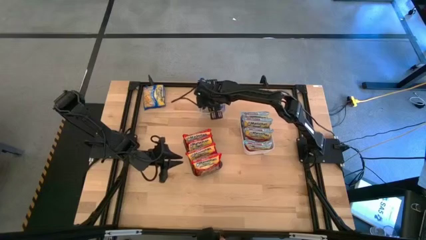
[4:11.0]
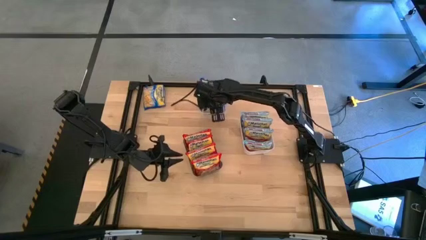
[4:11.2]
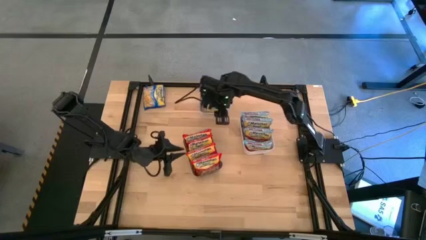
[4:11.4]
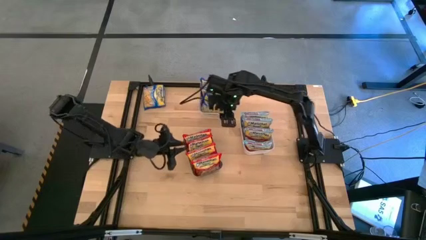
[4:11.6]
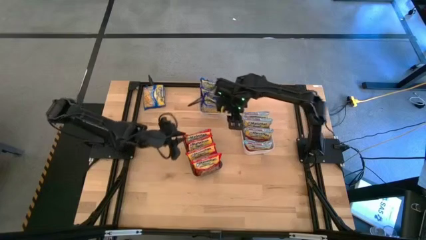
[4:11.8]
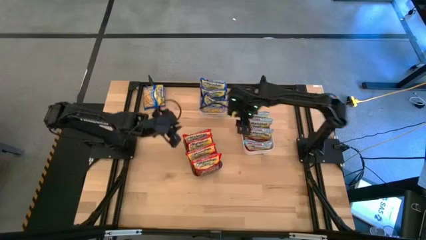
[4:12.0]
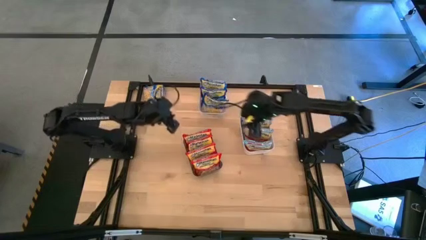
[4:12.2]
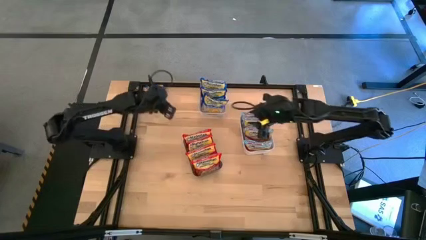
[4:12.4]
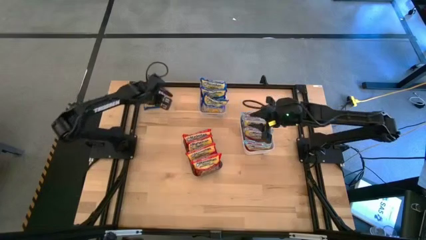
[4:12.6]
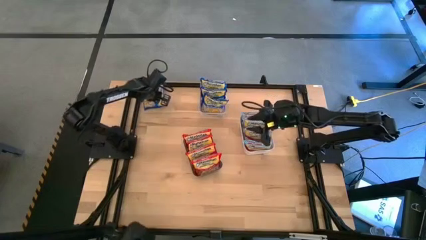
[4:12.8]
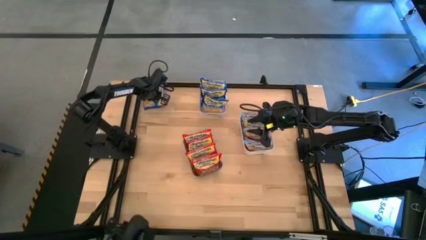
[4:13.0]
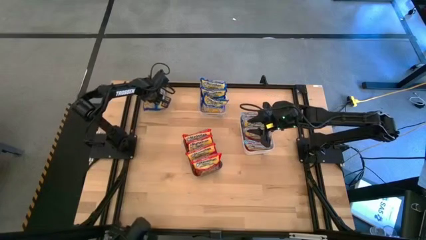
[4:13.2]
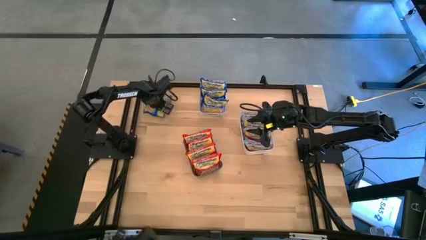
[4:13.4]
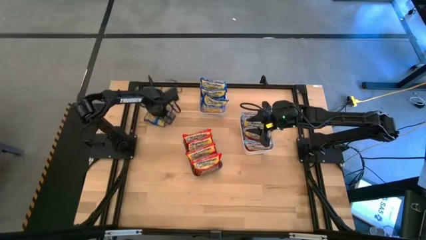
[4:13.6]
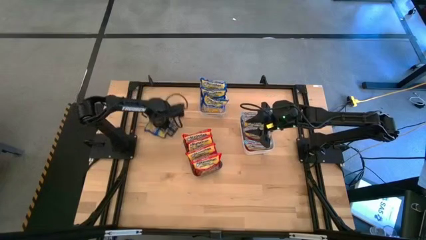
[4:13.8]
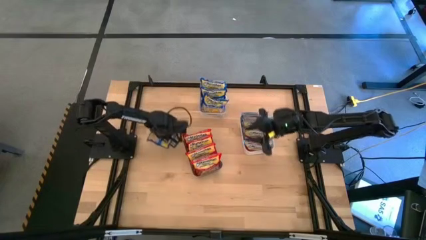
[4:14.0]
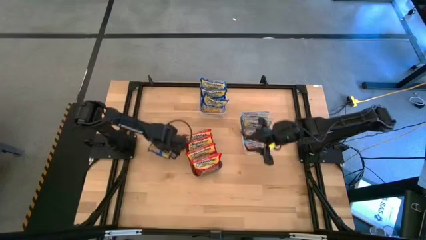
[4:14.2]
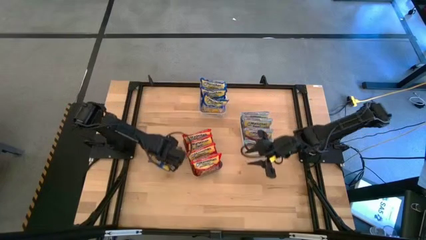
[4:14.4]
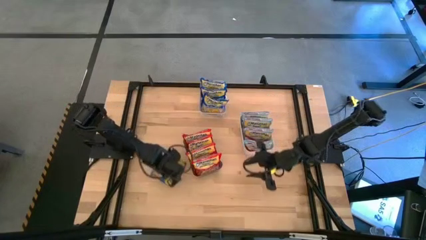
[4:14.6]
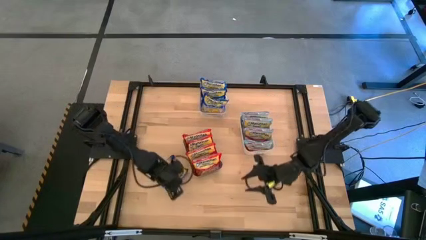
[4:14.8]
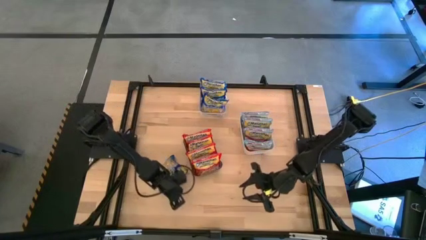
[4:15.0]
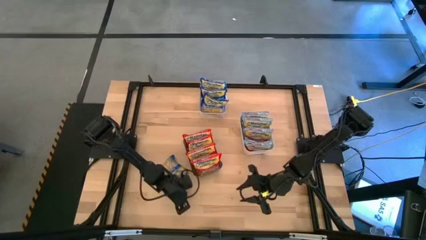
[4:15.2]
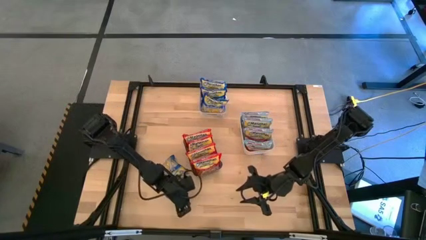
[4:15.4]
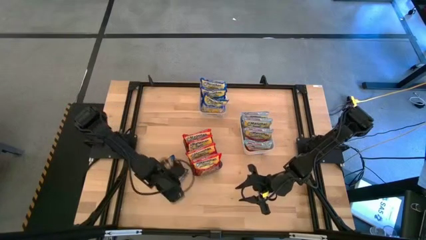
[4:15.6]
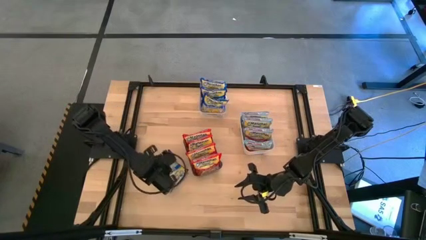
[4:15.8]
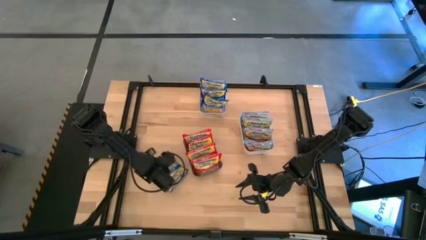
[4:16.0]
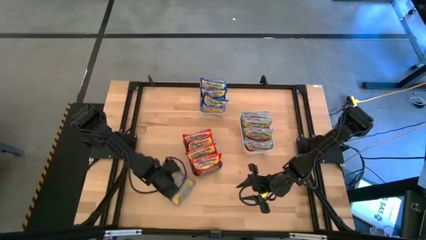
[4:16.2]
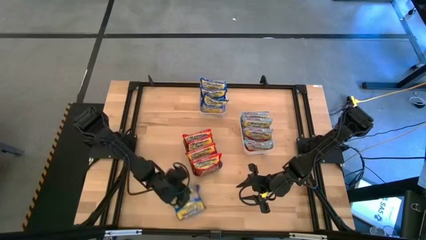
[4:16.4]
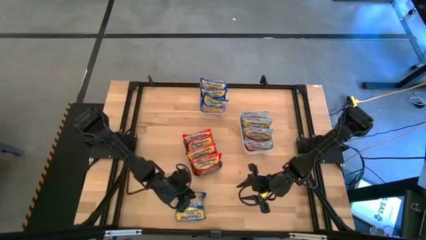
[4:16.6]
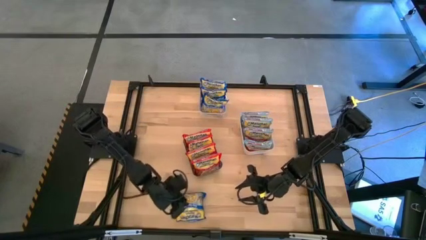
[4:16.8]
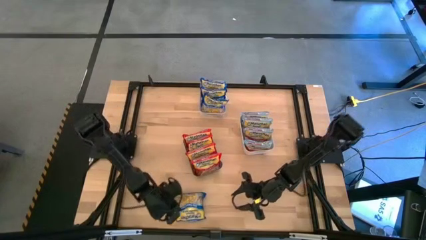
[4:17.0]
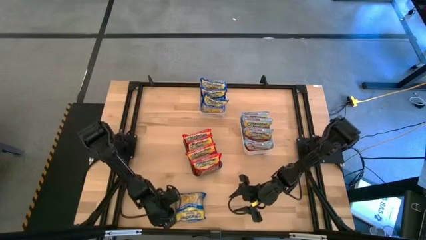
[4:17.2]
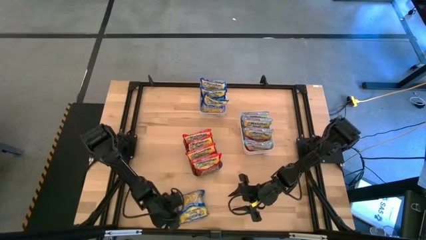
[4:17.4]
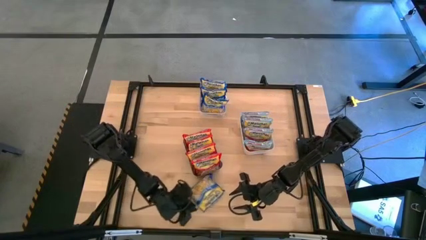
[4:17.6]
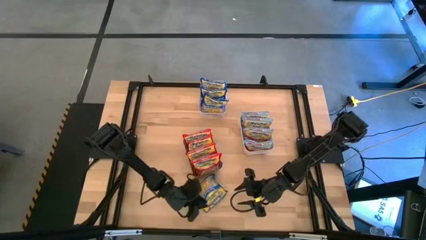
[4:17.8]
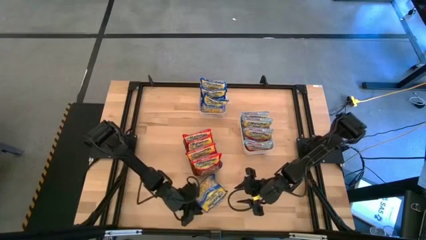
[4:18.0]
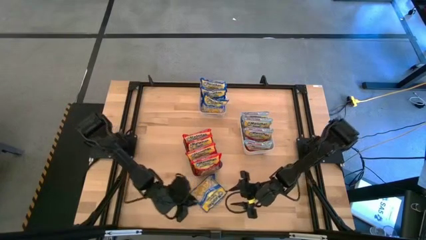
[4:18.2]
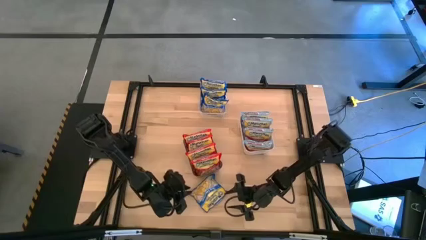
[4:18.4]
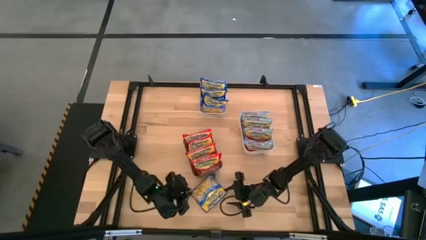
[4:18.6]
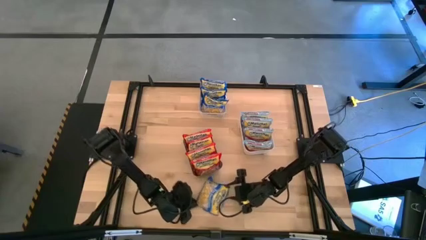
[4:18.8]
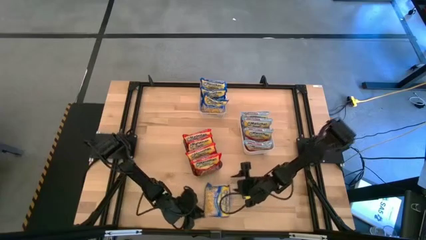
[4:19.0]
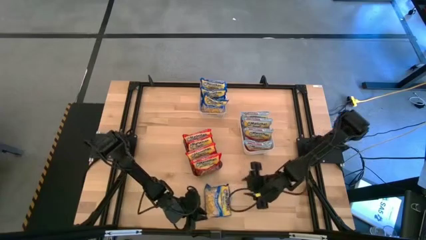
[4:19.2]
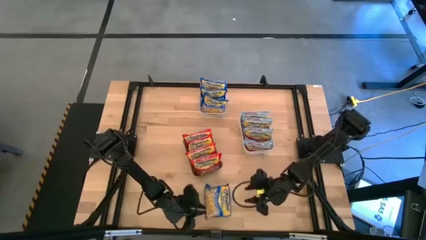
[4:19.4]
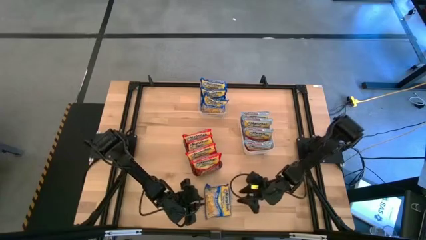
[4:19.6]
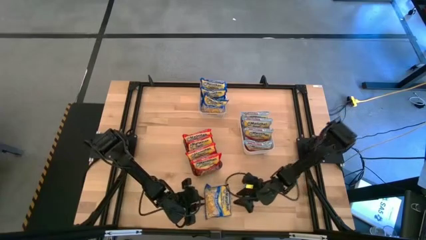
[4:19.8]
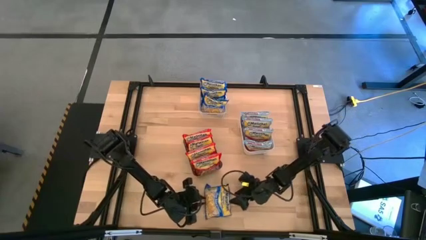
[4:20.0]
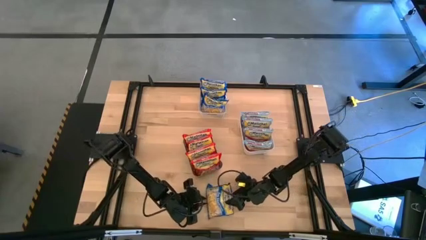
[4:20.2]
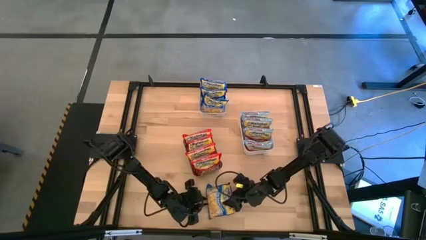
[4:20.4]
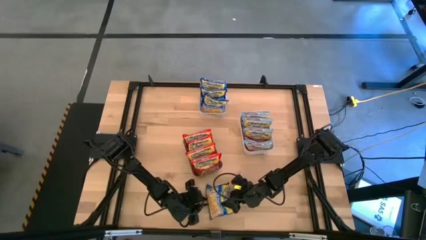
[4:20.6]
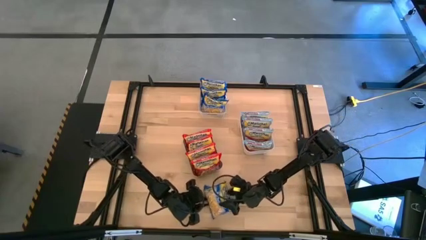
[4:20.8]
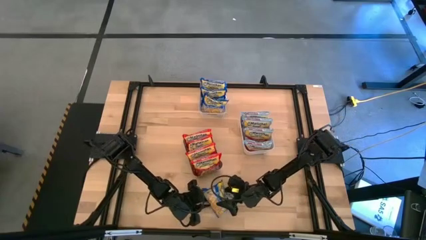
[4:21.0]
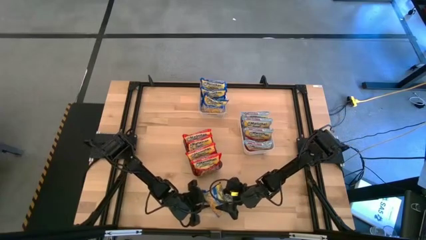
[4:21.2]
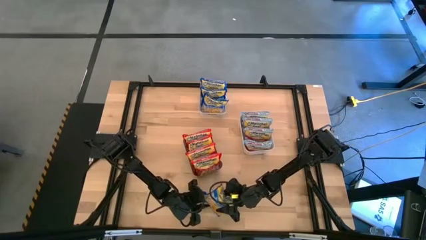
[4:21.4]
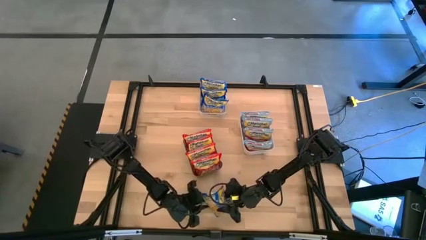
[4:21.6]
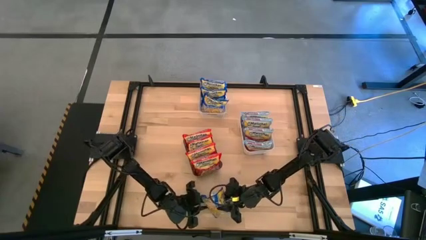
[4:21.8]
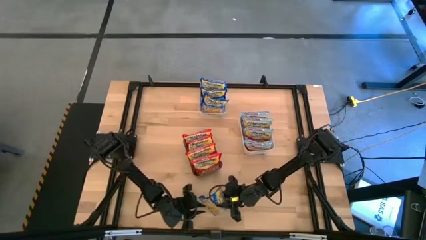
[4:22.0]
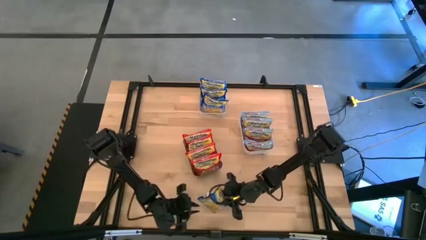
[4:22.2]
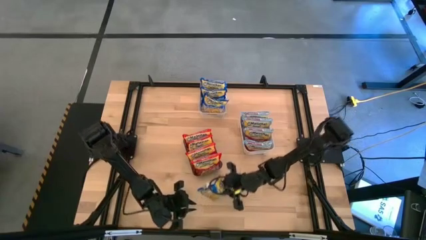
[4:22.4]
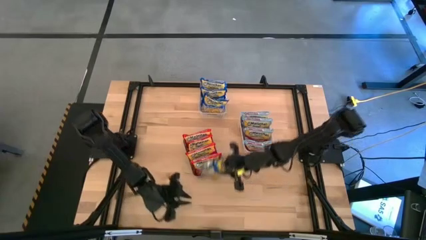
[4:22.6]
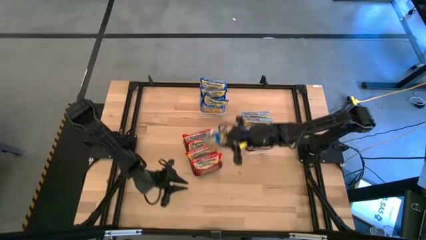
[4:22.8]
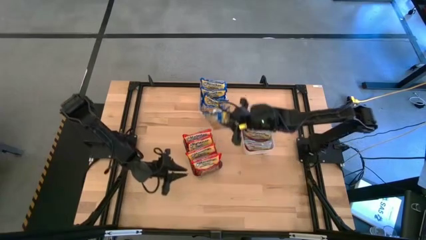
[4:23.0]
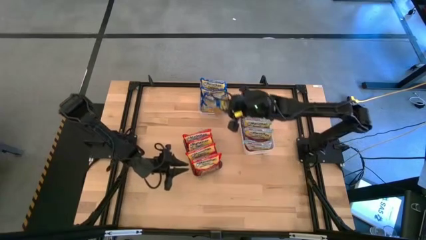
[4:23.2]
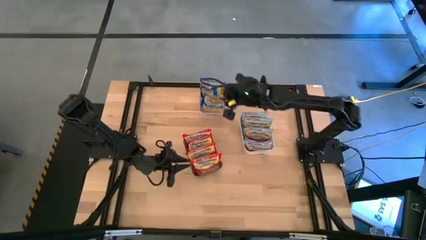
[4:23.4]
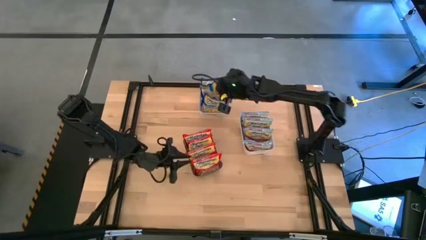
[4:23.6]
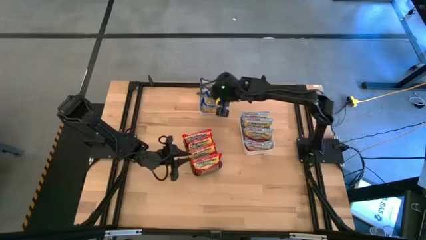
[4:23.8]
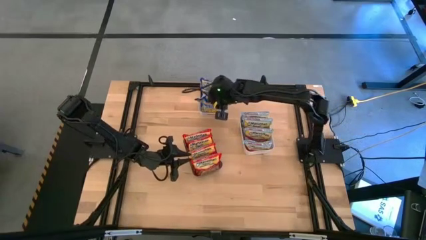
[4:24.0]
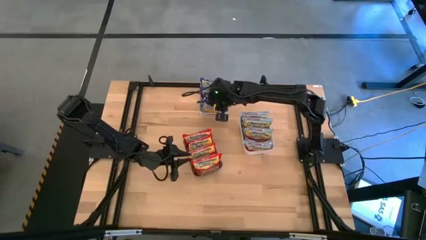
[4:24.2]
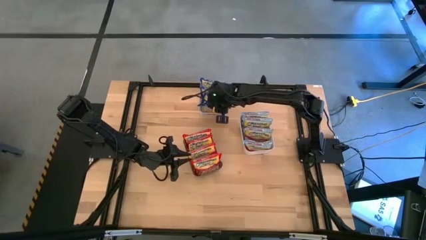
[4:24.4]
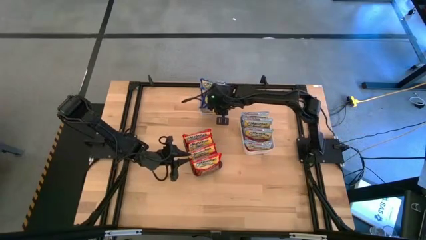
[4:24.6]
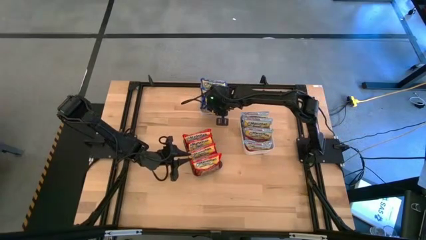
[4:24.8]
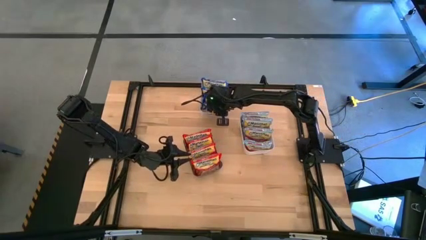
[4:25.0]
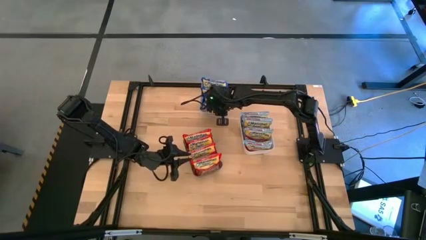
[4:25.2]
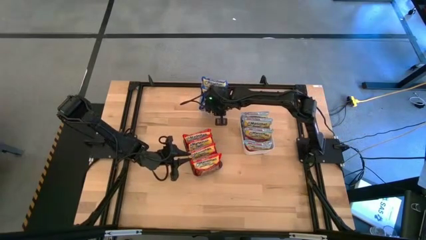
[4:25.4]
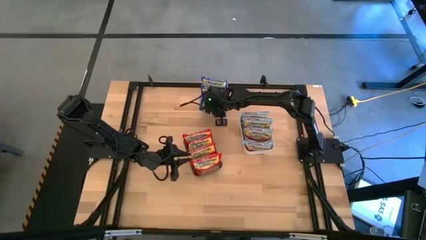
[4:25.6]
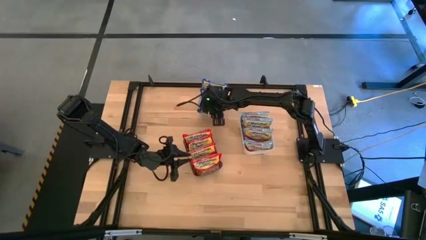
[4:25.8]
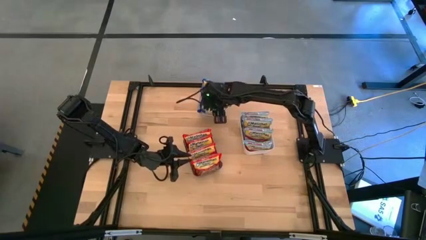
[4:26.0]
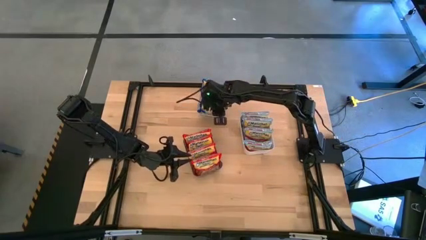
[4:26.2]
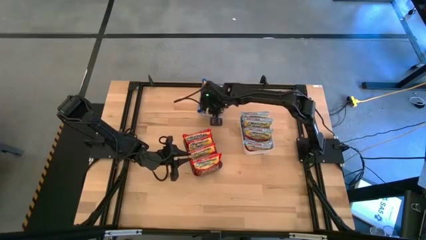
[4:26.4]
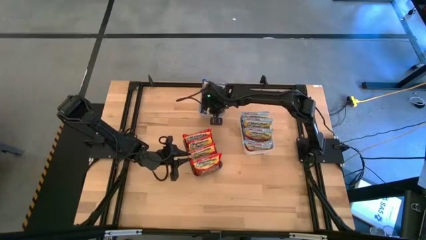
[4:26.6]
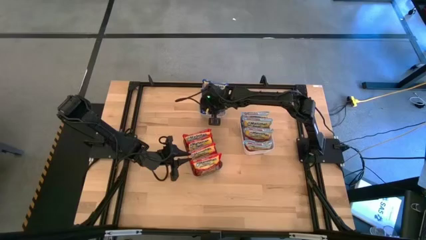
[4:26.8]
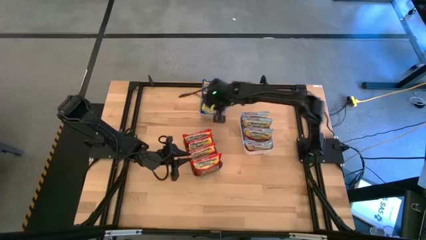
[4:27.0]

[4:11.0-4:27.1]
Task: Sort Maruchan noodles
Put the blue noodle pack into the transparent bin

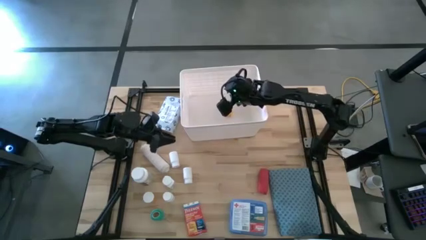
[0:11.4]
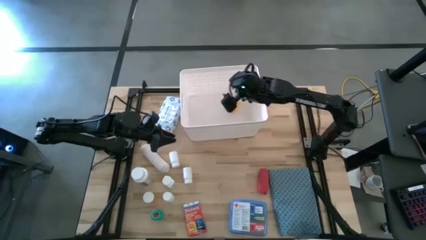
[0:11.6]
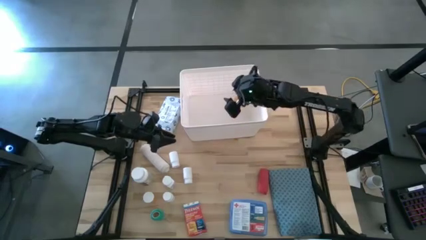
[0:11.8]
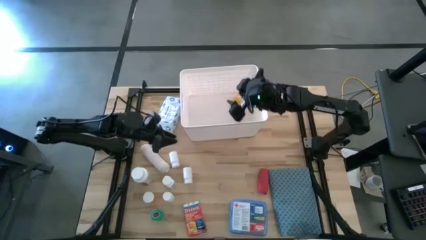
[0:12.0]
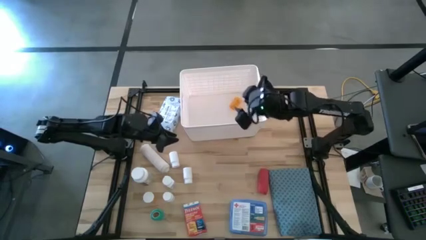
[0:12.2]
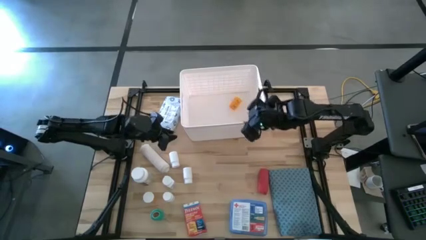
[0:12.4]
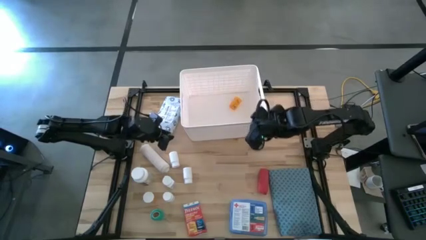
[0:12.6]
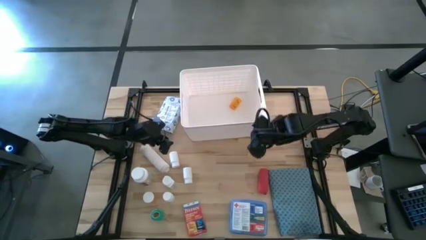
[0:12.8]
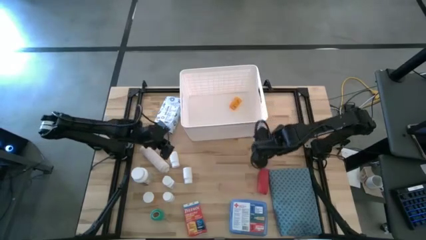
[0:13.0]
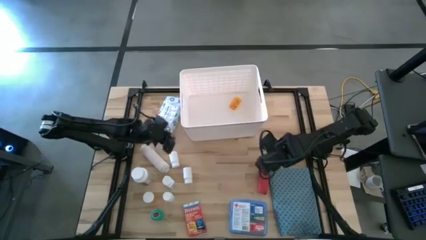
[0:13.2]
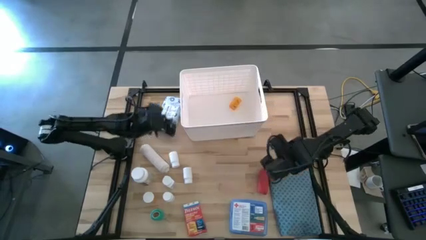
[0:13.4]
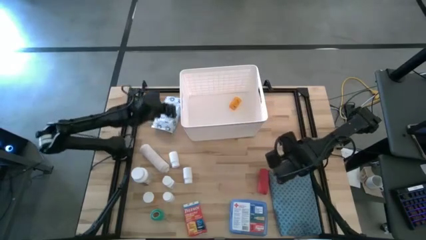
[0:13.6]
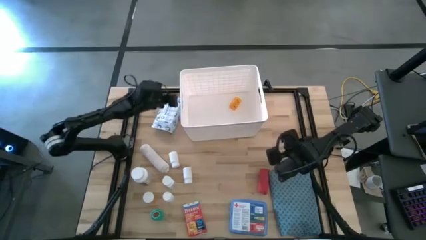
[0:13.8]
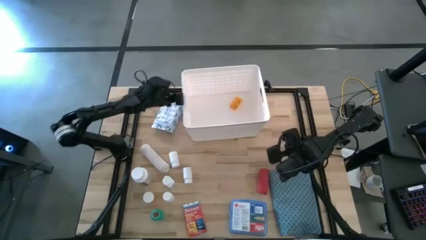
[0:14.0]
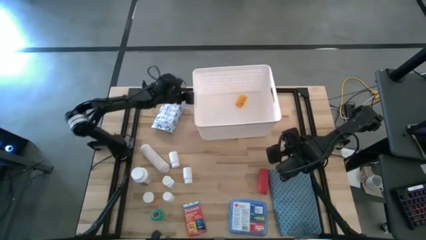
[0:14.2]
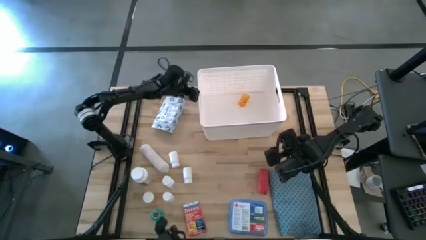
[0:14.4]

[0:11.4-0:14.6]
Task: Pick & place medical supplies in basket/bin
Adjust the white bin
